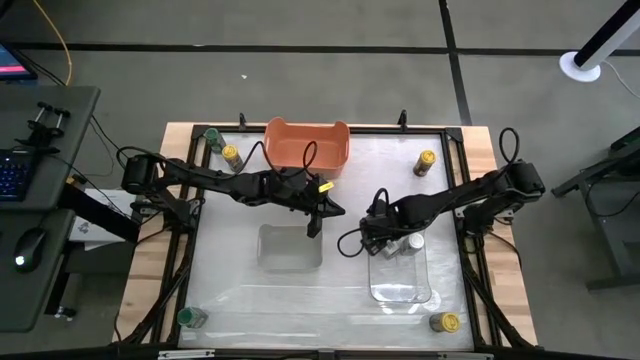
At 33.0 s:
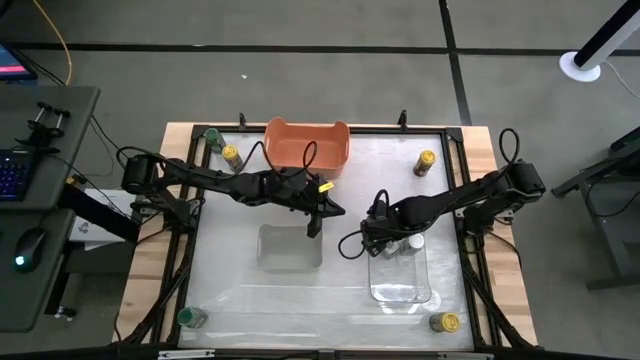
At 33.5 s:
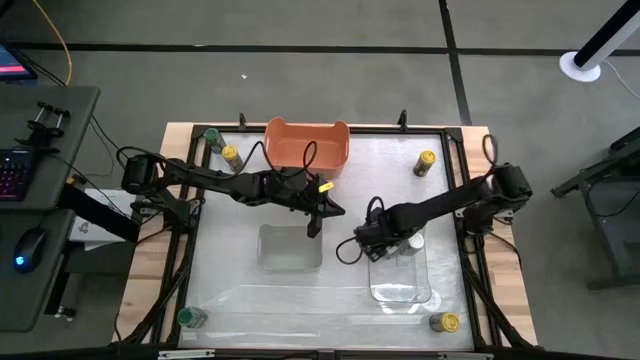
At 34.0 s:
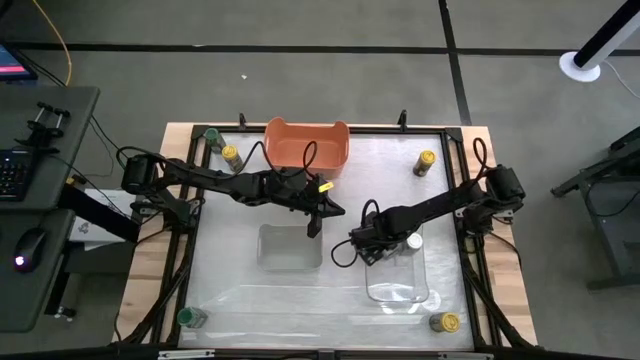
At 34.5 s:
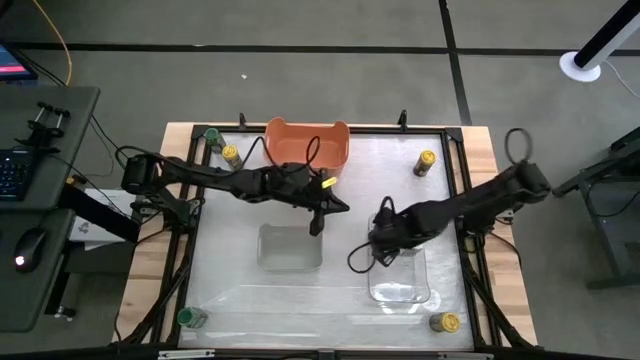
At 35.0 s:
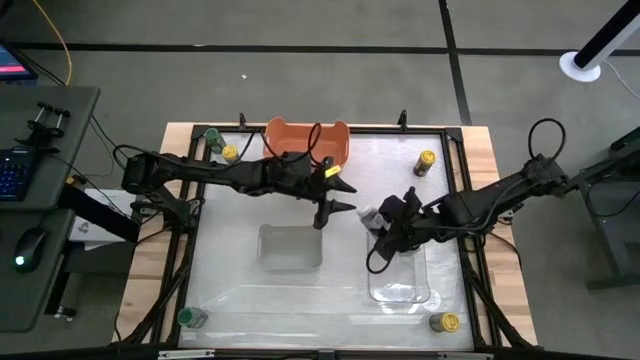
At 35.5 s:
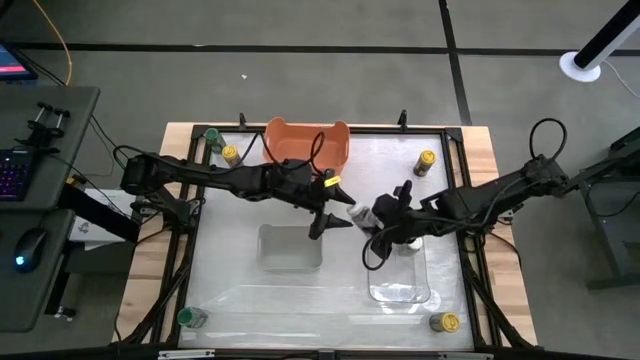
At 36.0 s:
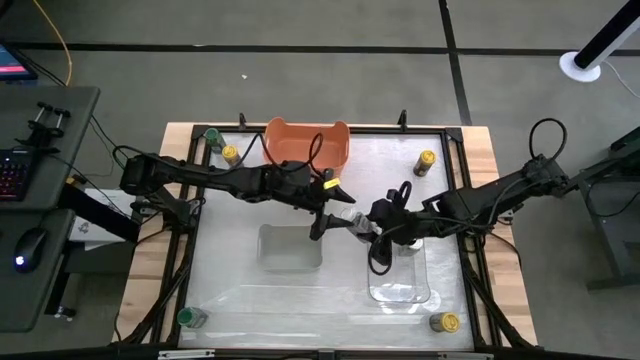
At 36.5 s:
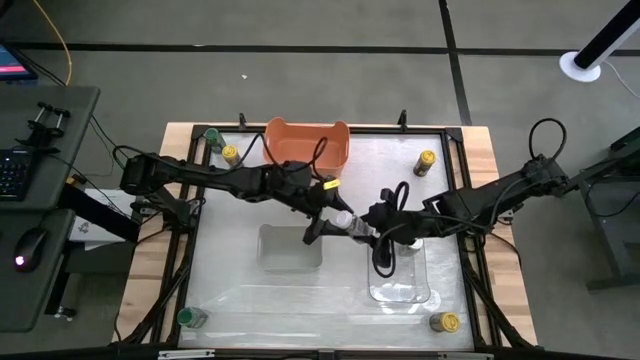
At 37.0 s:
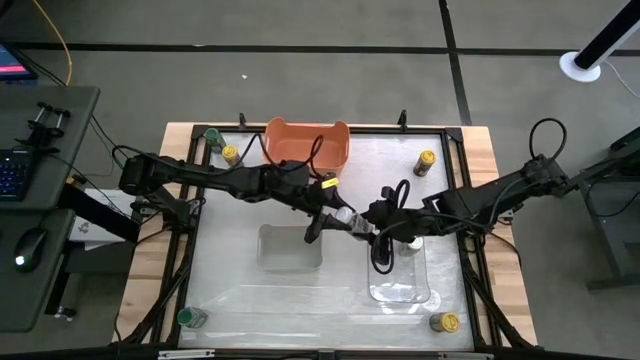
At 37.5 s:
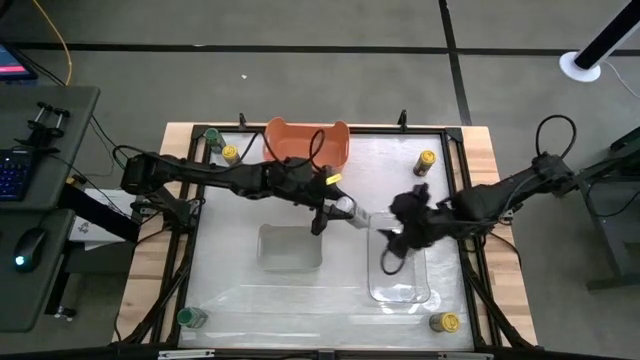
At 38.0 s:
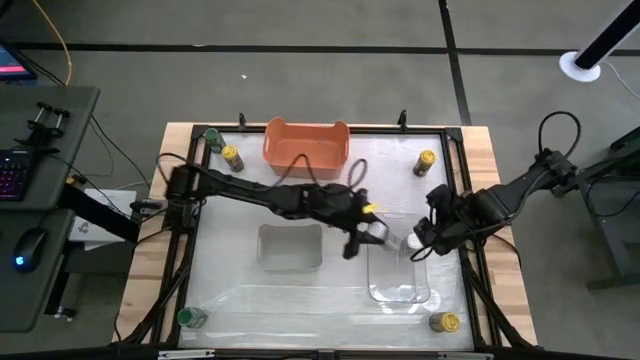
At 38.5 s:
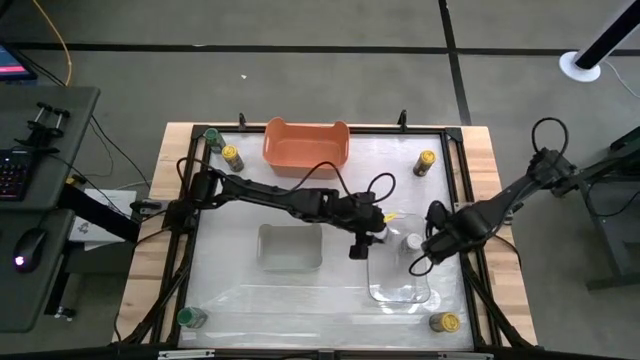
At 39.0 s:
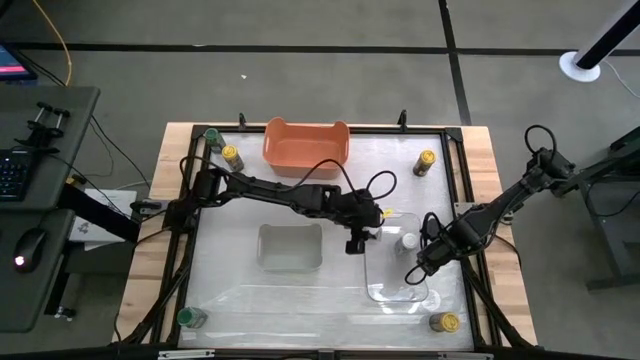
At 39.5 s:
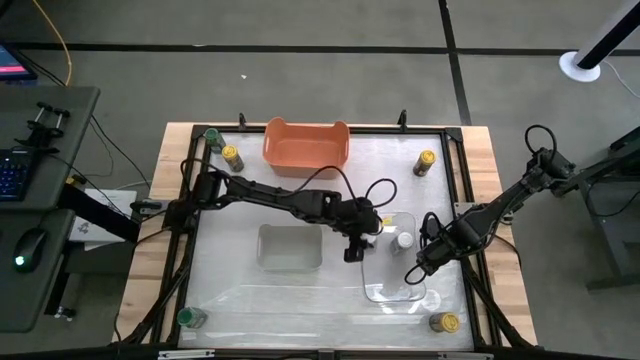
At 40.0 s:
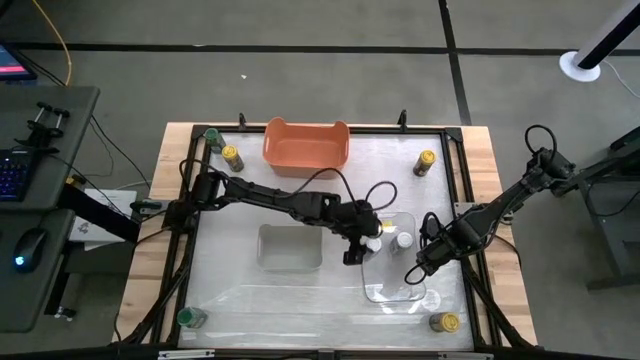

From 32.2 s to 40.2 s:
Task: Sort spices by type
Put the white seasoning bottle into the transparent bin

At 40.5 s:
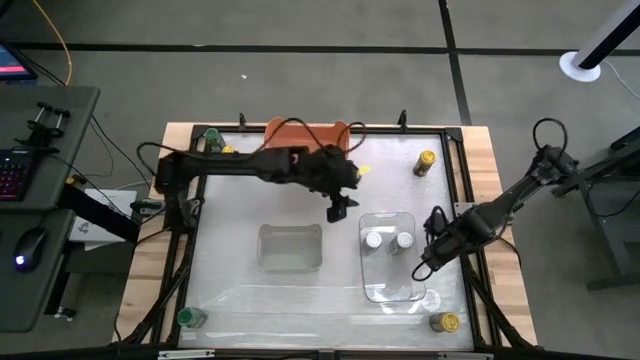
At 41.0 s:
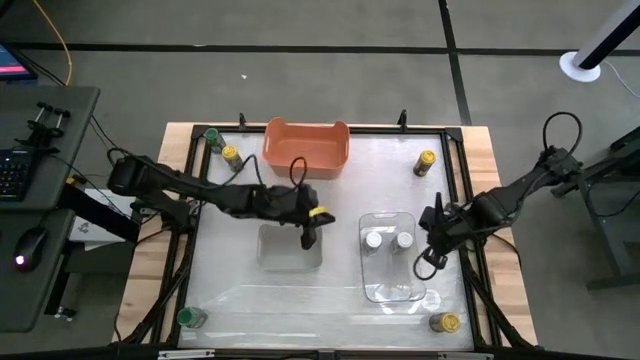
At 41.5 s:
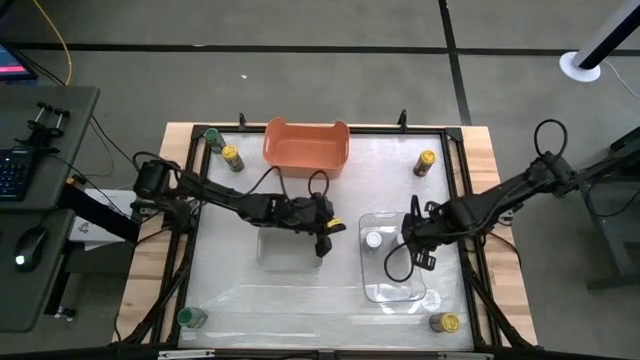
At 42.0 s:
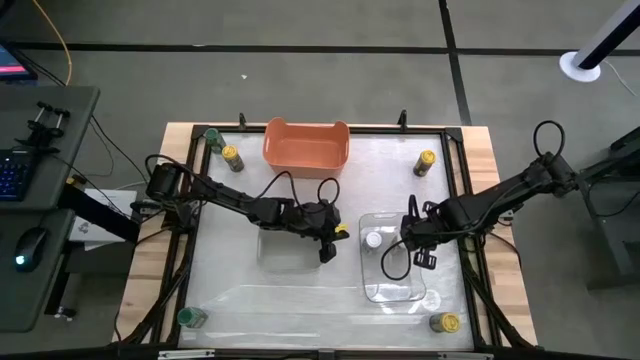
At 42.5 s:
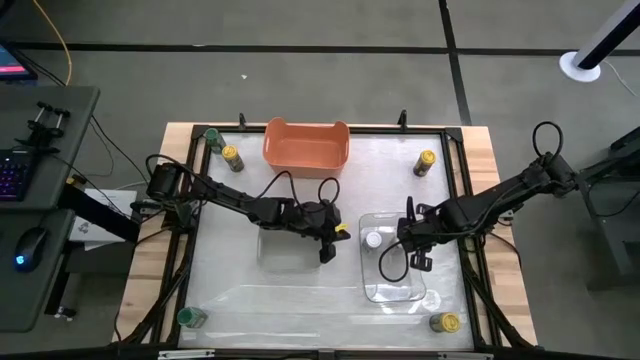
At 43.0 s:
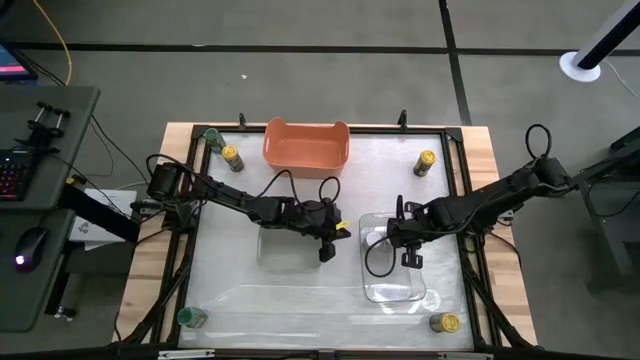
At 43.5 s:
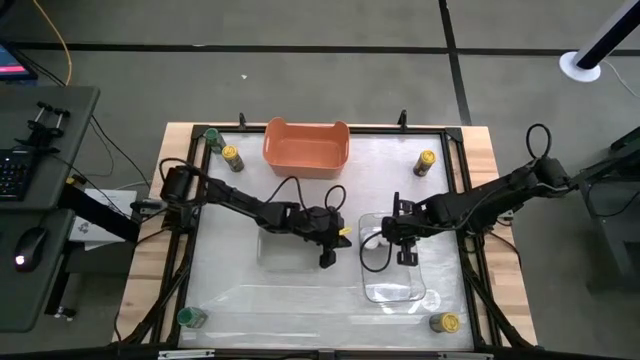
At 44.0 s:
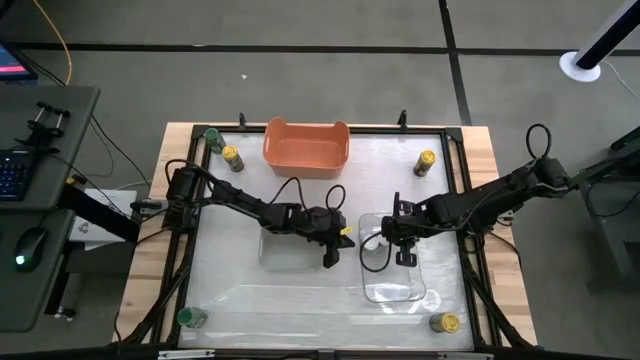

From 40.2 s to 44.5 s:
Adjust the white seasoning bottle in the transparent bin

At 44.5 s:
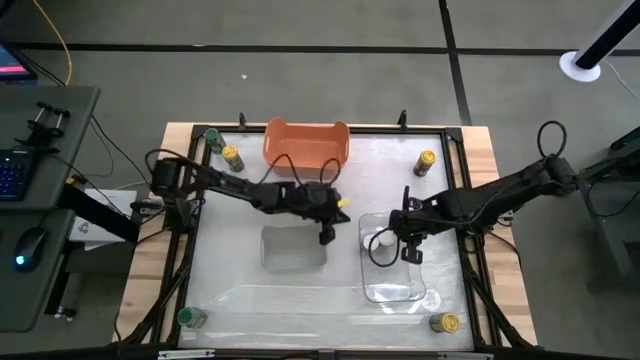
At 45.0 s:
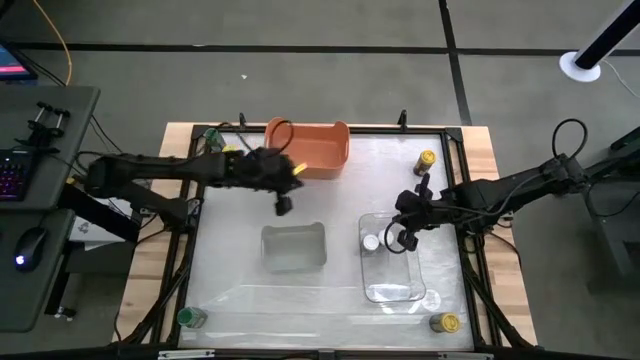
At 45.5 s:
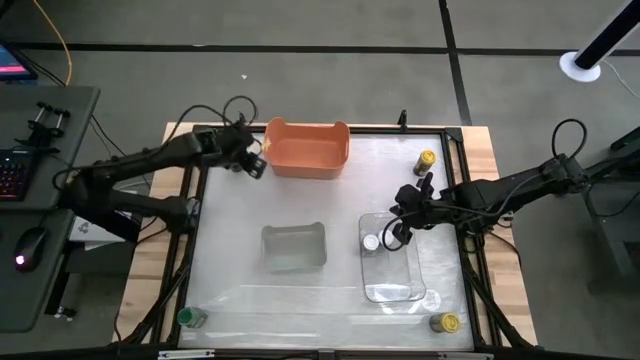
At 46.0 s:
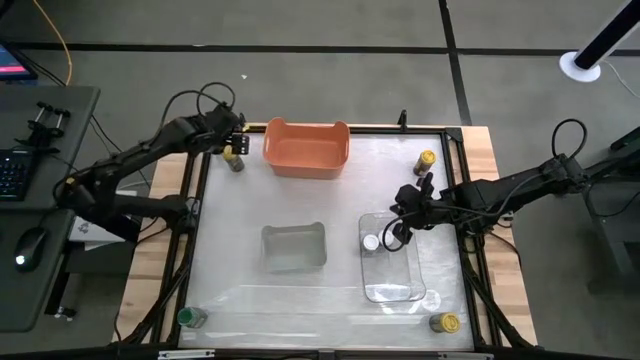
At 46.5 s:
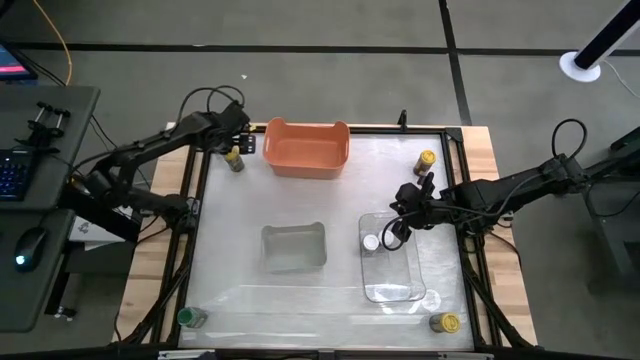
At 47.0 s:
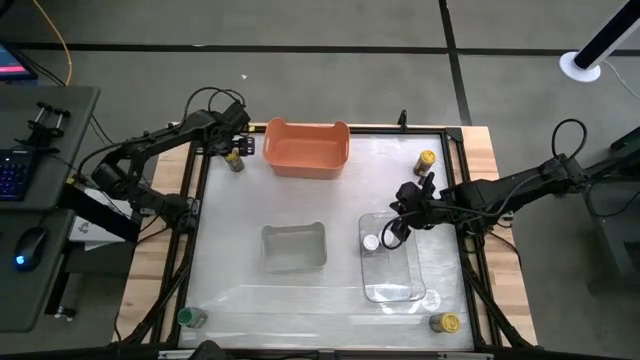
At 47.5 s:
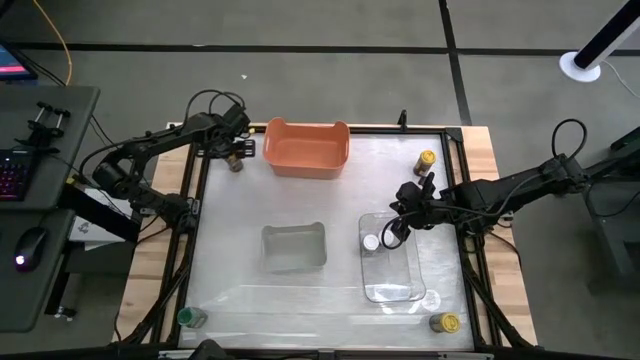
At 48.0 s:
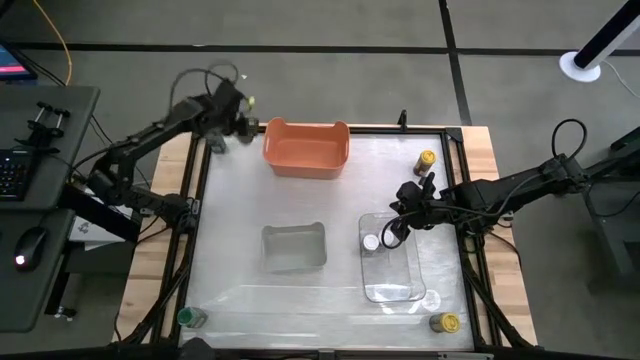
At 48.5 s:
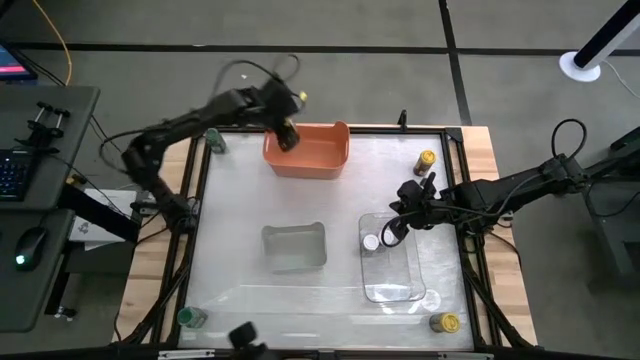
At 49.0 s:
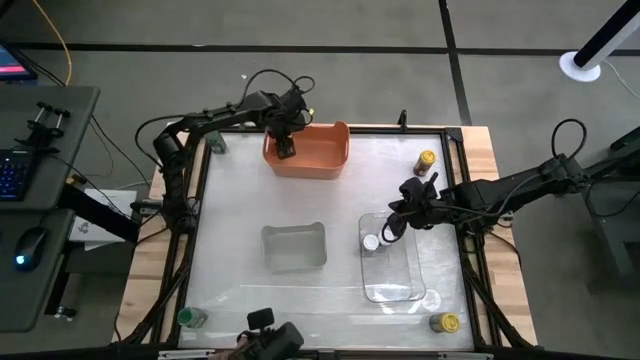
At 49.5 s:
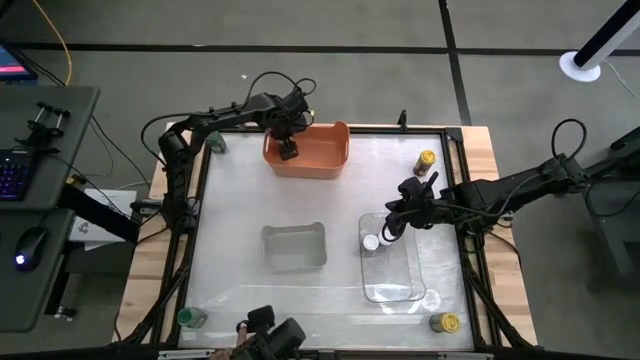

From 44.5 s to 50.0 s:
Put the top left yellow seasoning bottle into the orange bin

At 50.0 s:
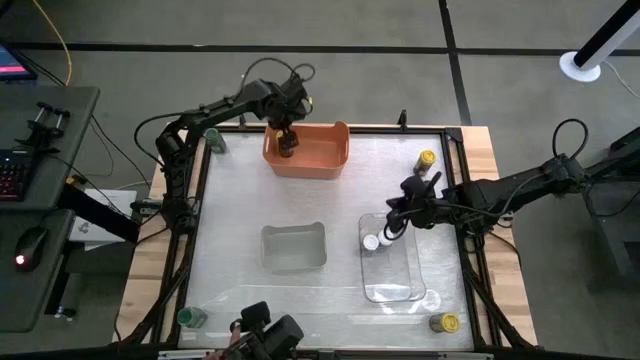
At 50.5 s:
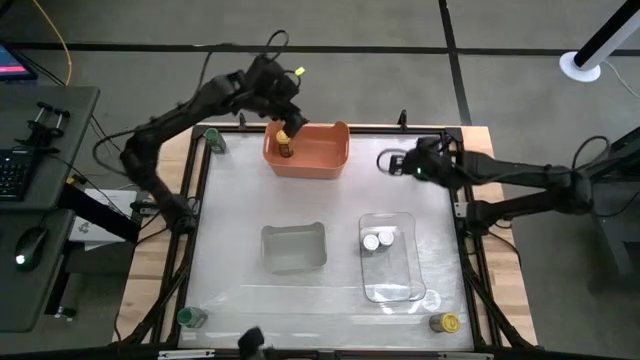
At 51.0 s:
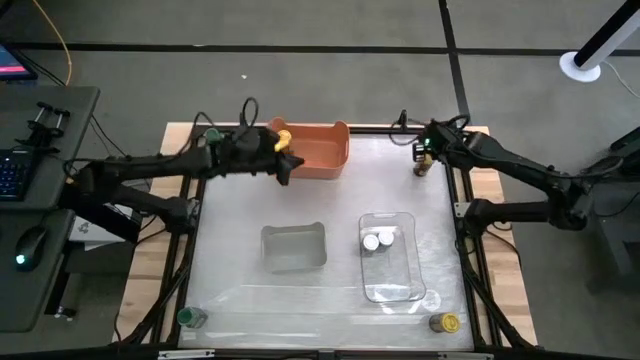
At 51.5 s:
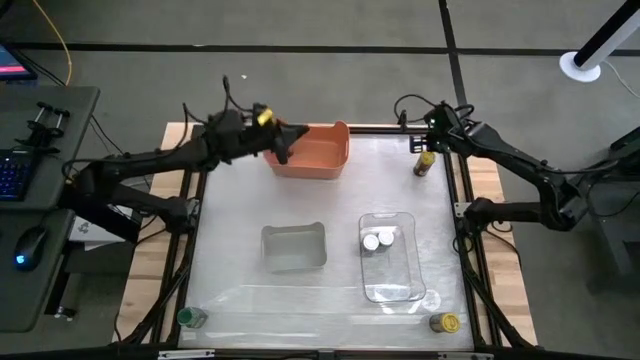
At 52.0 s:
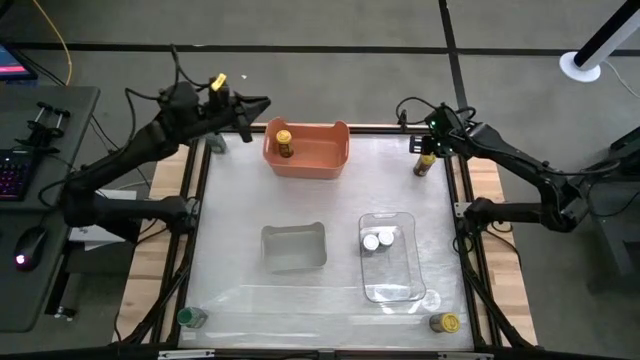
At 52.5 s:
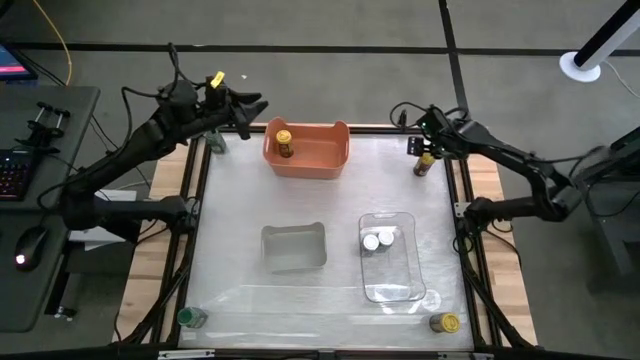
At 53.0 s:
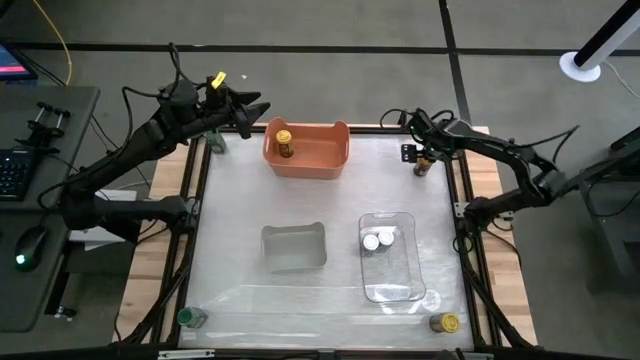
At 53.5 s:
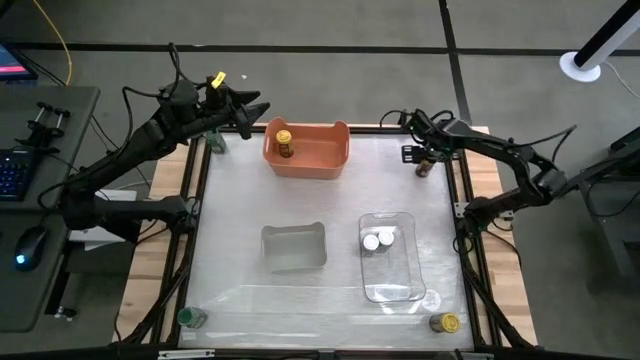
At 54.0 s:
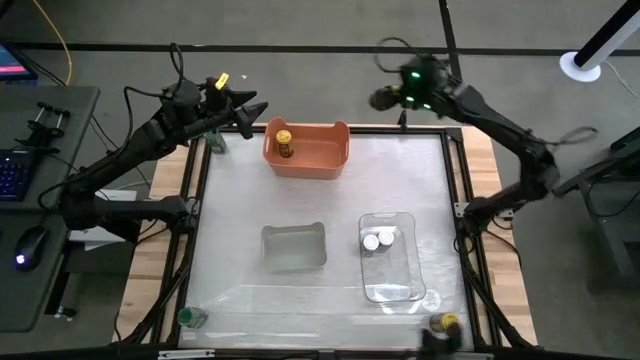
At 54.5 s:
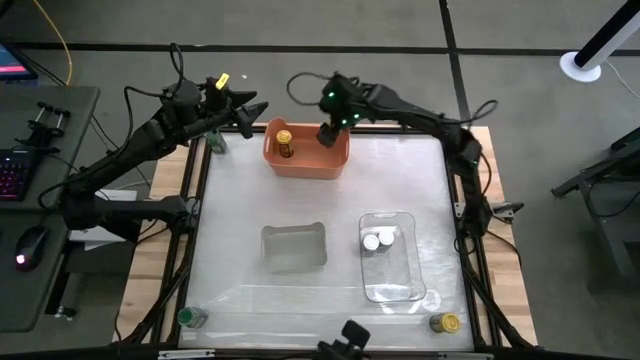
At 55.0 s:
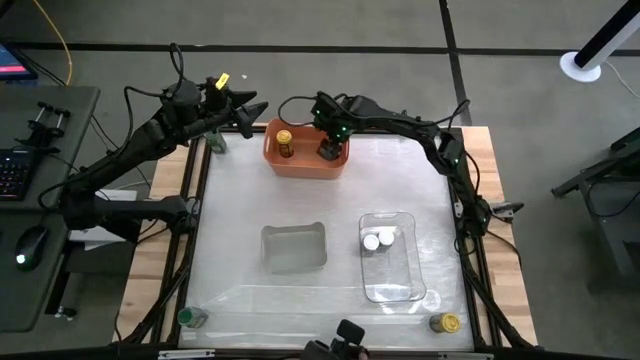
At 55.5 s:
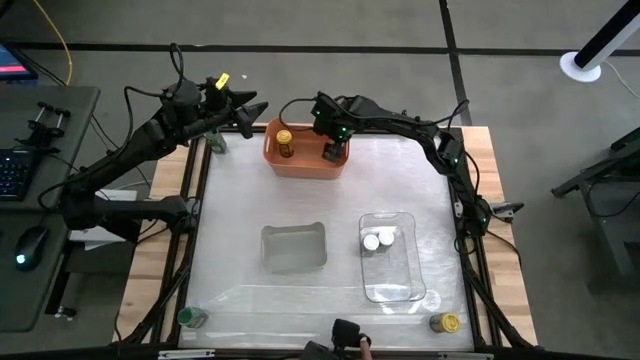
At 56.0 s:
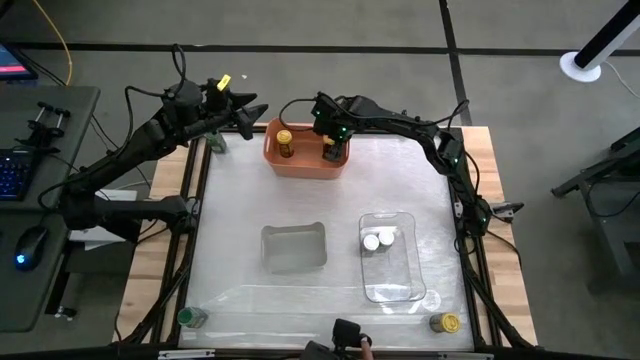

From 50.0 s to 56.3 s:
Put the top yellow seasoning bottle into the orange bin
